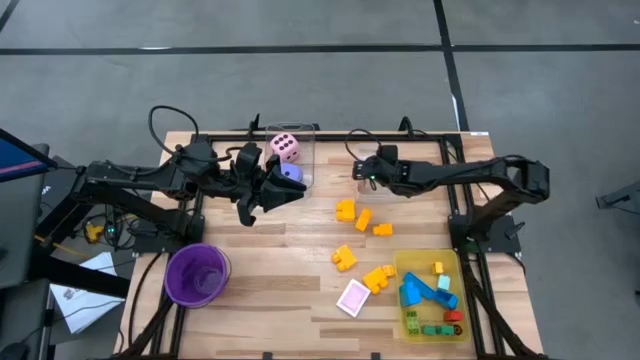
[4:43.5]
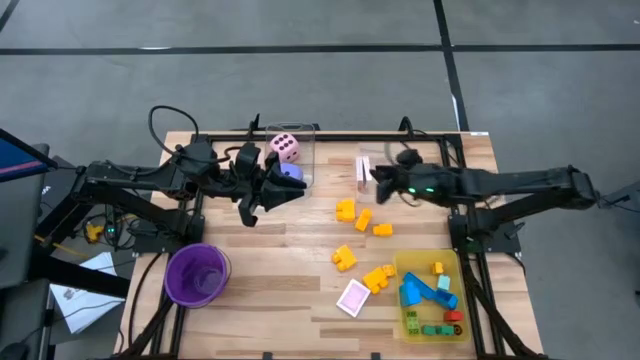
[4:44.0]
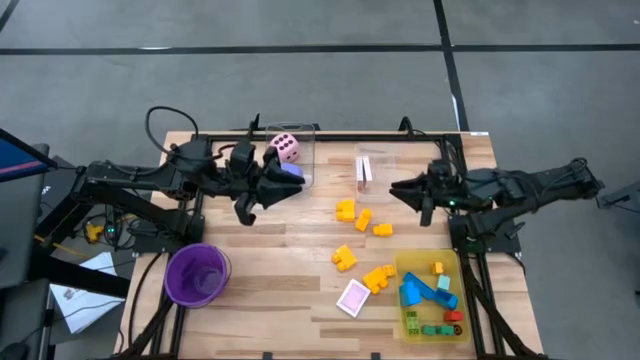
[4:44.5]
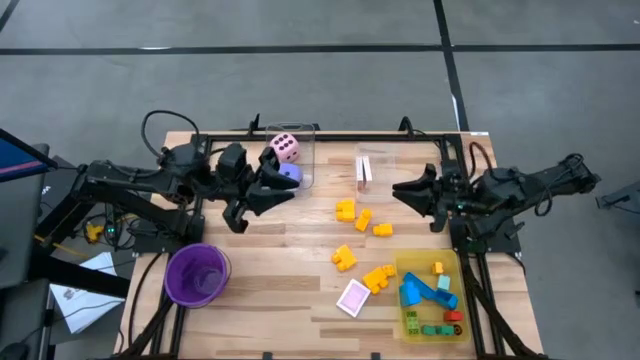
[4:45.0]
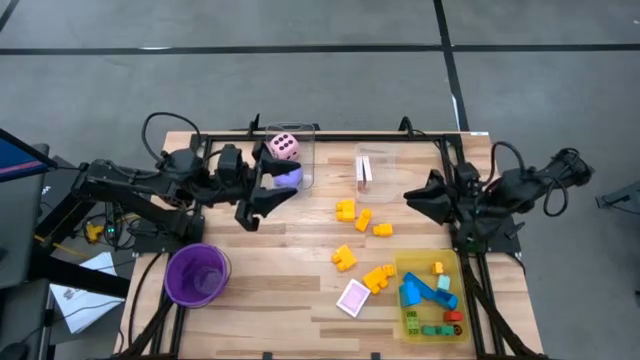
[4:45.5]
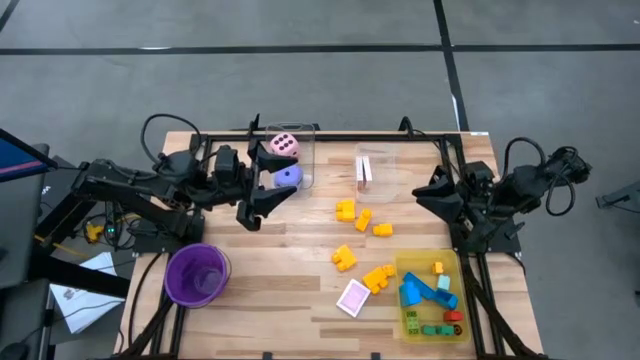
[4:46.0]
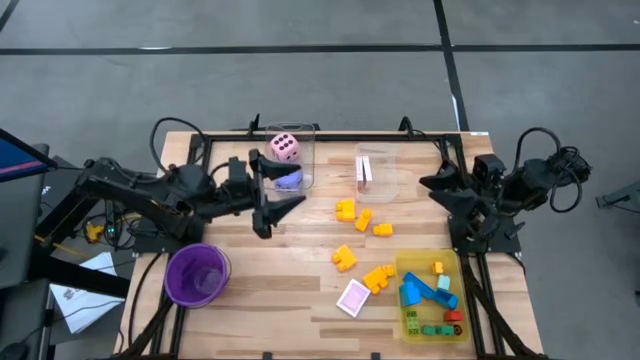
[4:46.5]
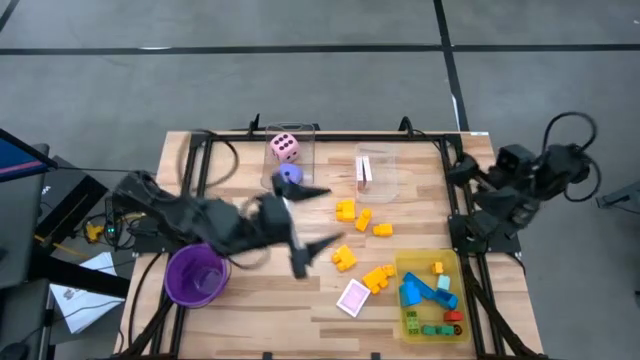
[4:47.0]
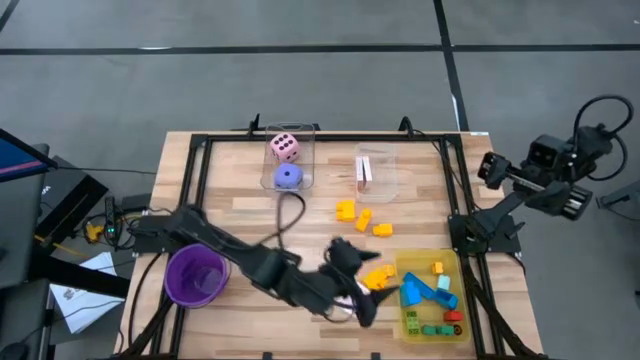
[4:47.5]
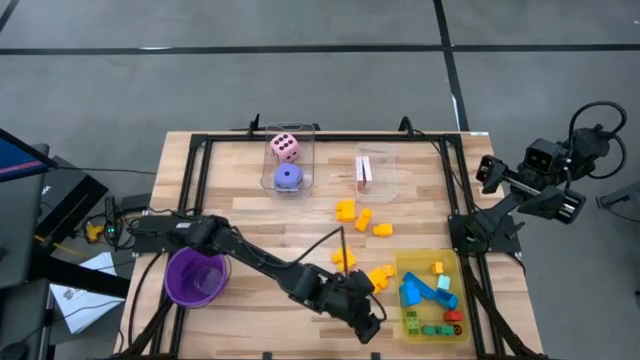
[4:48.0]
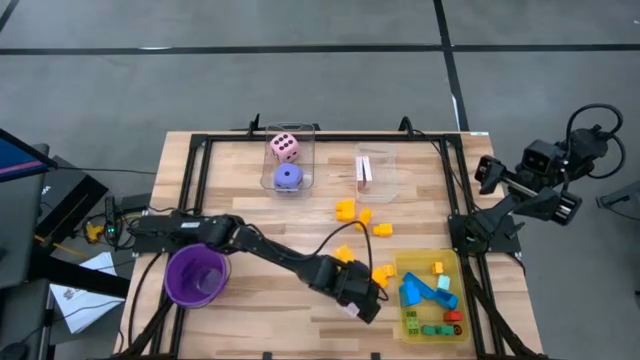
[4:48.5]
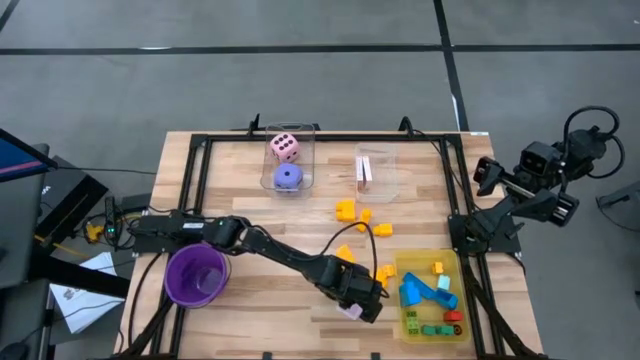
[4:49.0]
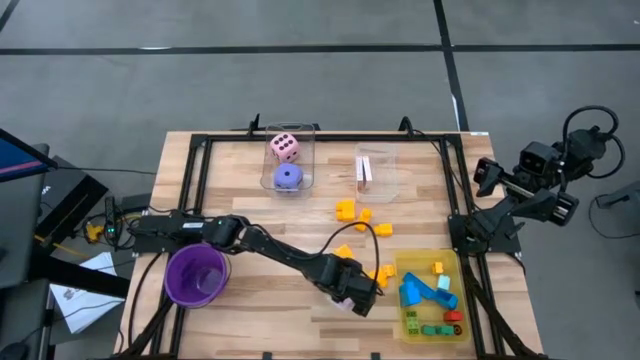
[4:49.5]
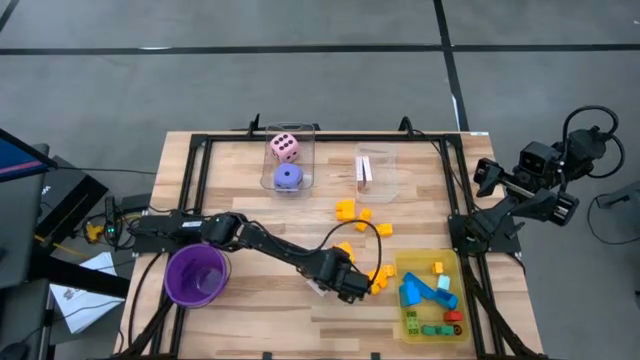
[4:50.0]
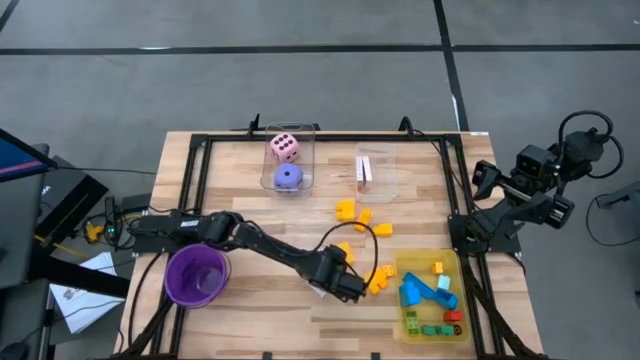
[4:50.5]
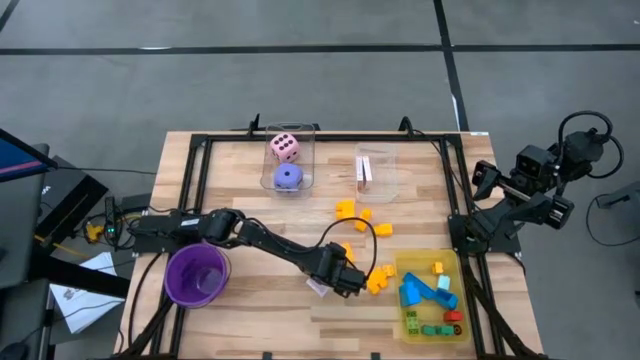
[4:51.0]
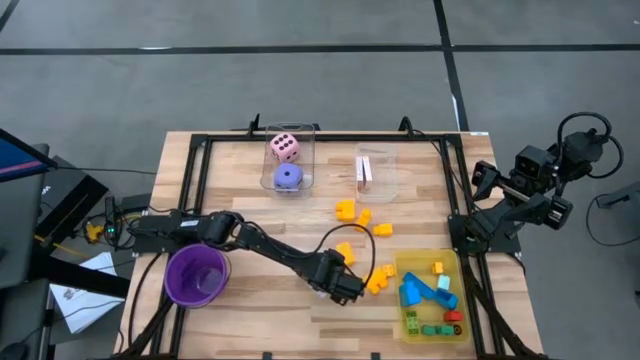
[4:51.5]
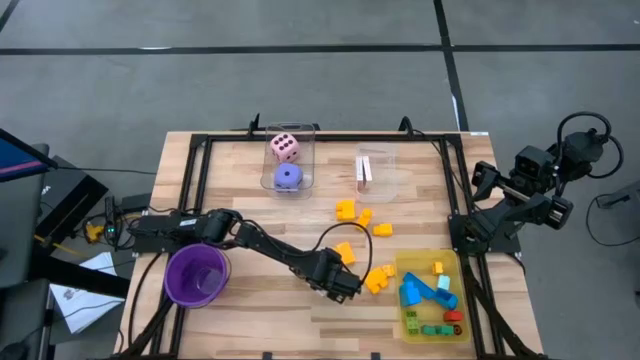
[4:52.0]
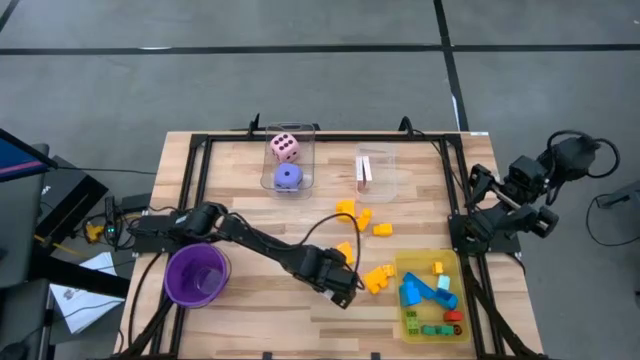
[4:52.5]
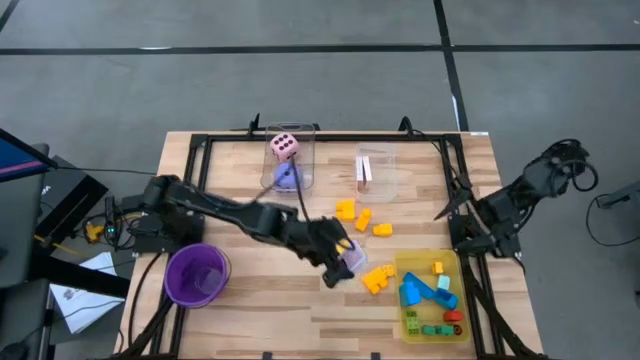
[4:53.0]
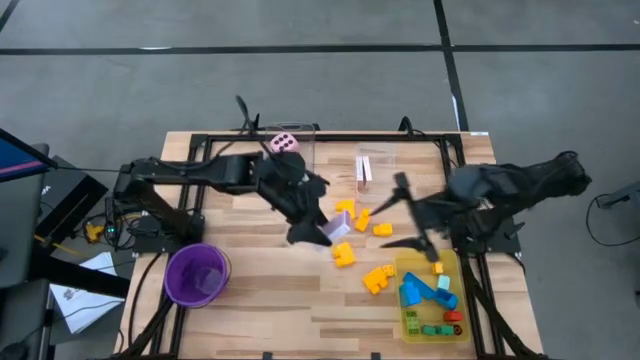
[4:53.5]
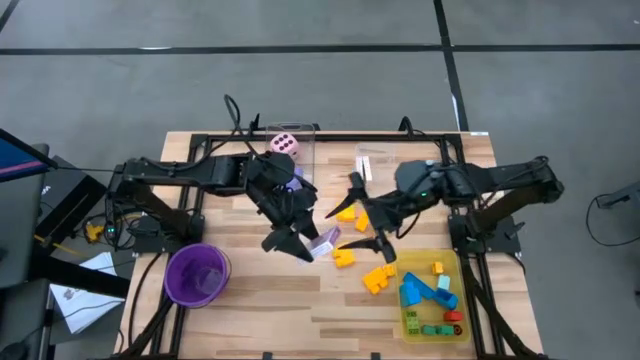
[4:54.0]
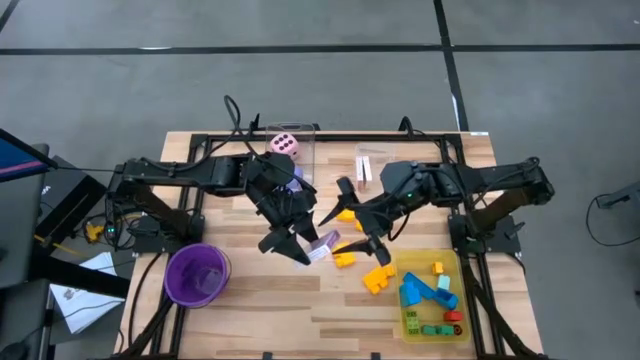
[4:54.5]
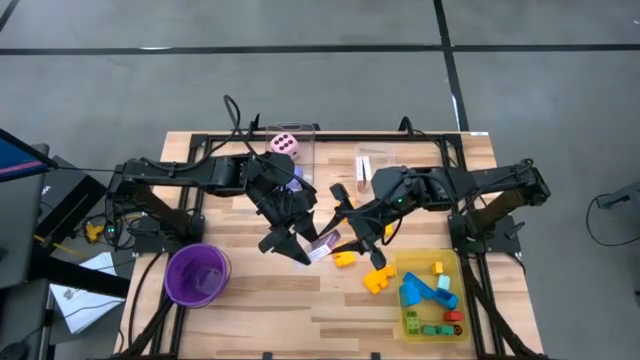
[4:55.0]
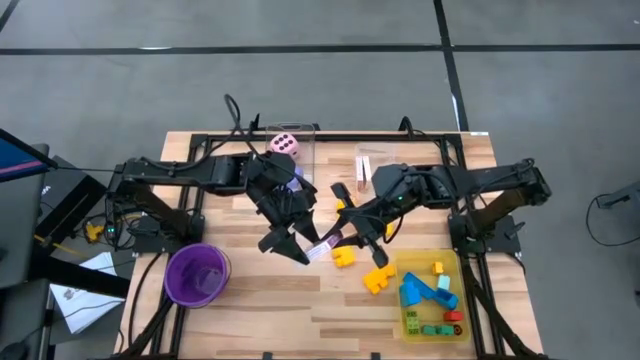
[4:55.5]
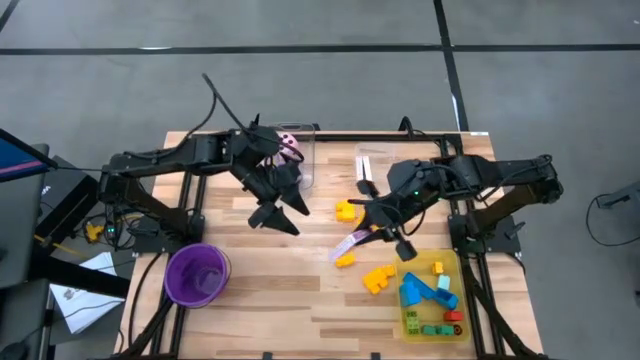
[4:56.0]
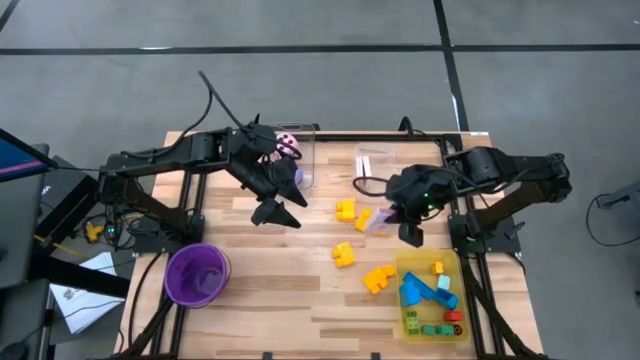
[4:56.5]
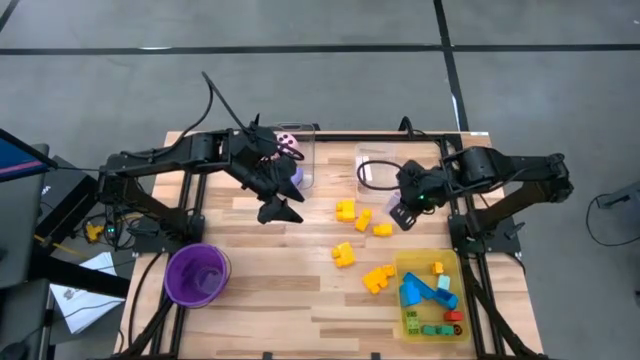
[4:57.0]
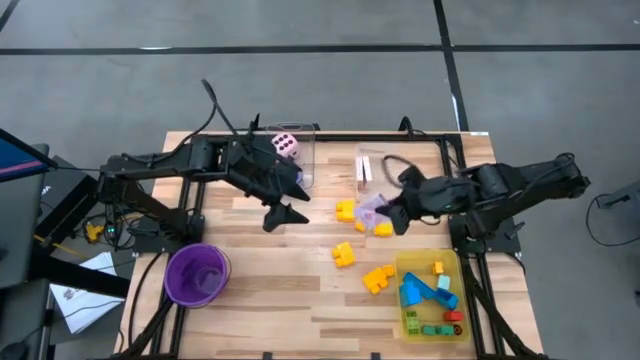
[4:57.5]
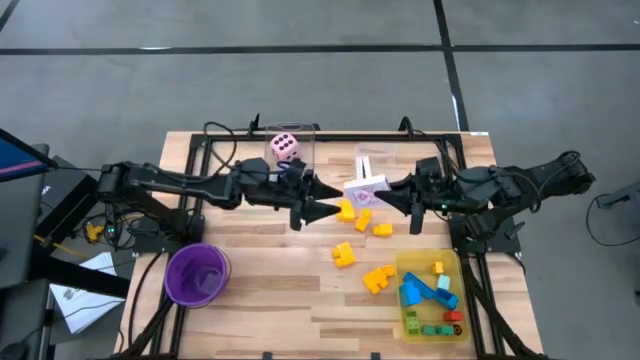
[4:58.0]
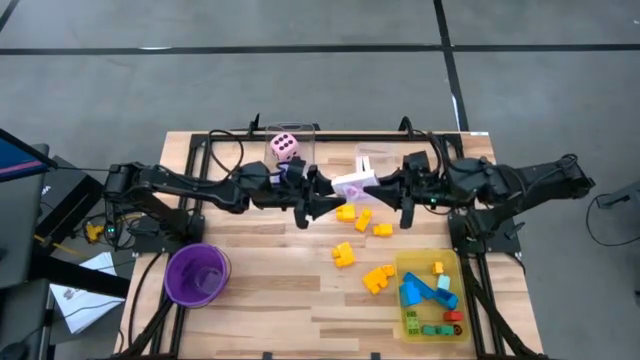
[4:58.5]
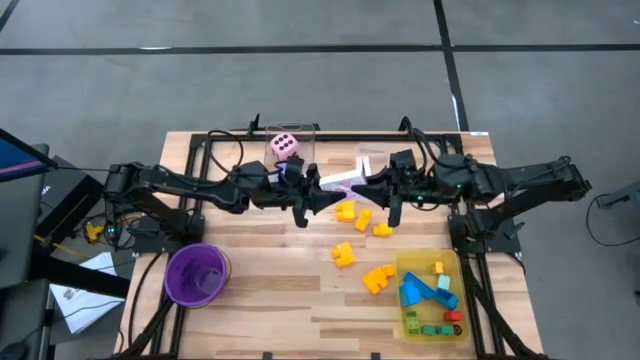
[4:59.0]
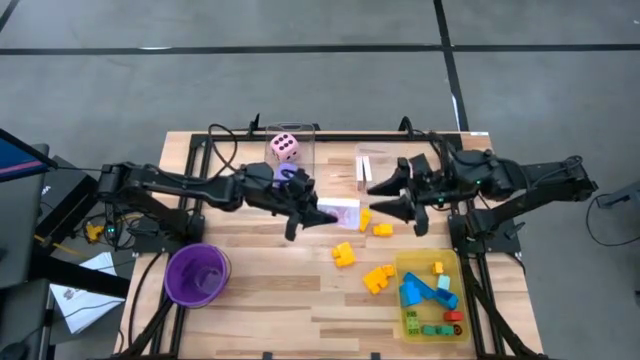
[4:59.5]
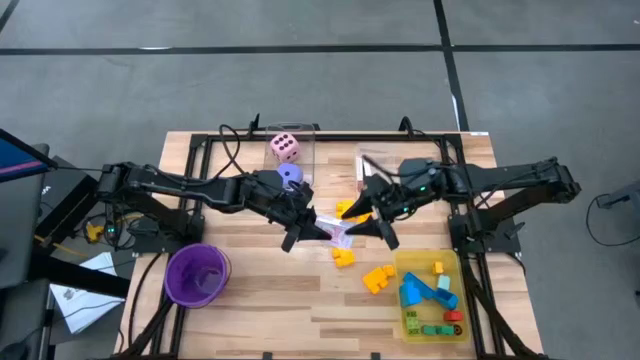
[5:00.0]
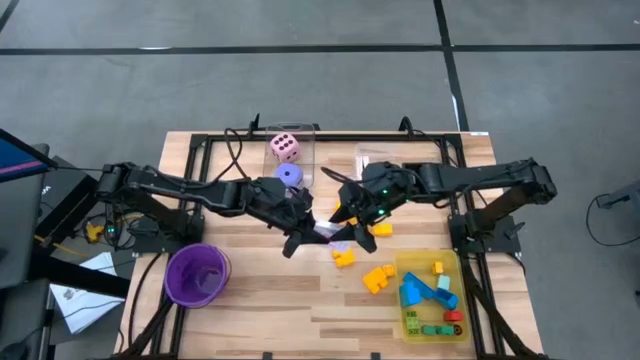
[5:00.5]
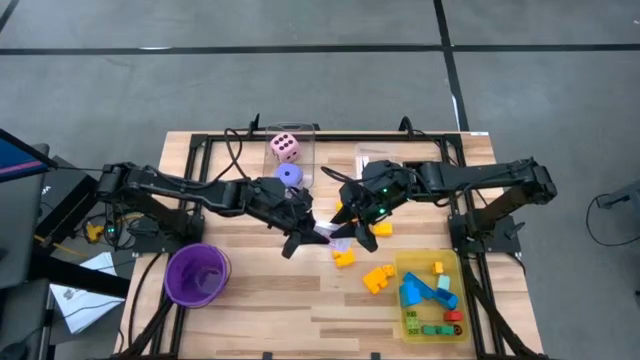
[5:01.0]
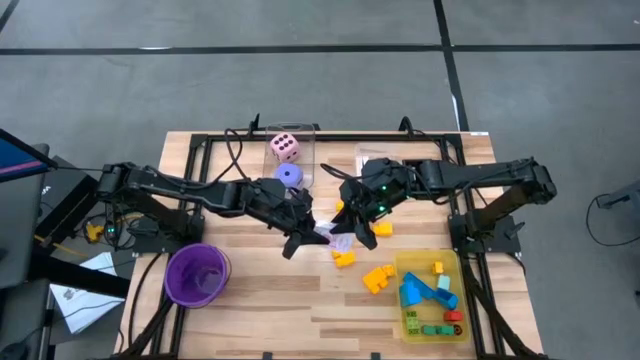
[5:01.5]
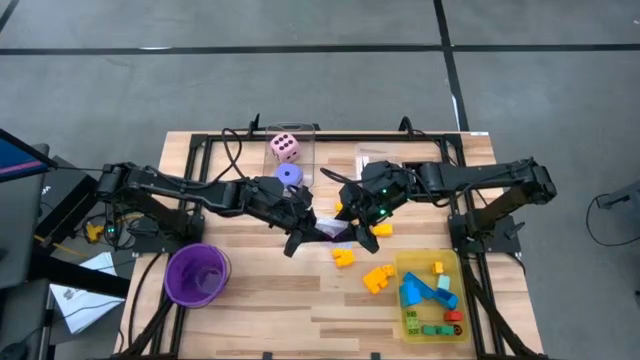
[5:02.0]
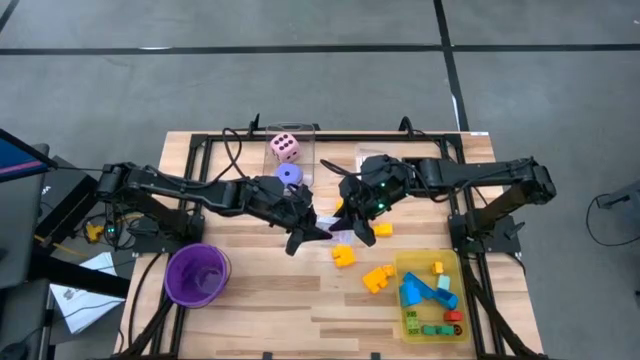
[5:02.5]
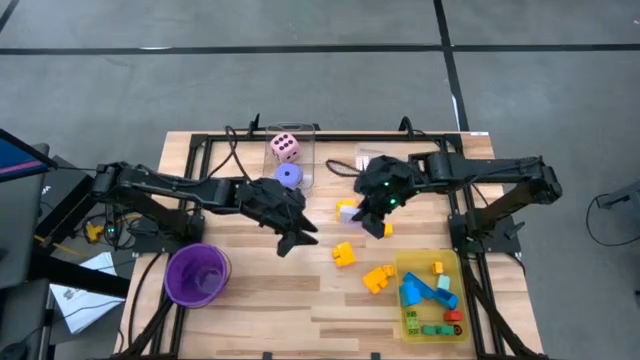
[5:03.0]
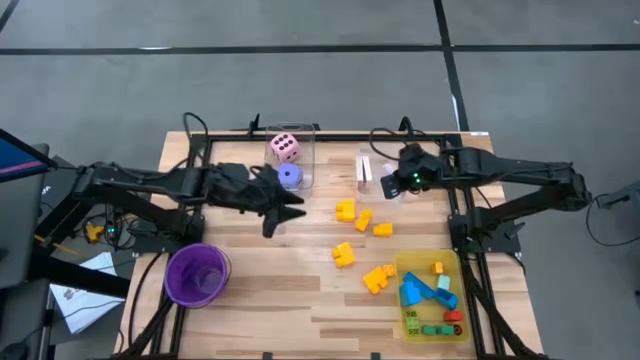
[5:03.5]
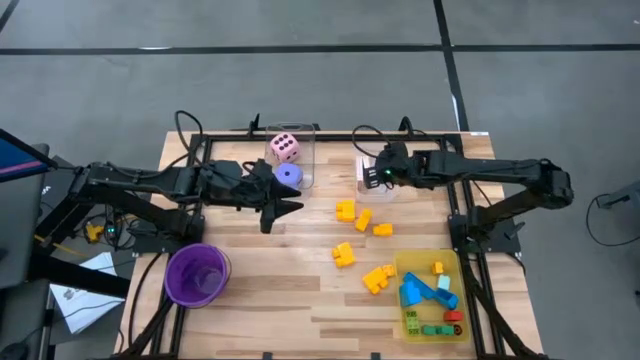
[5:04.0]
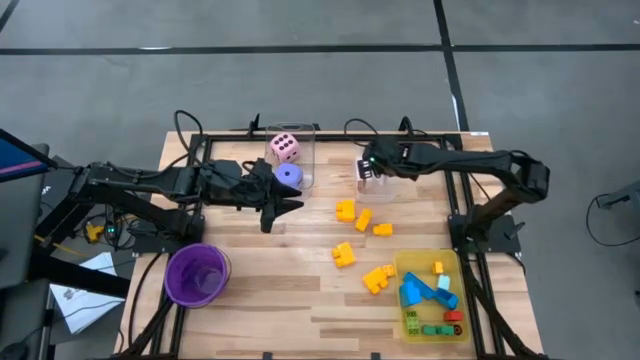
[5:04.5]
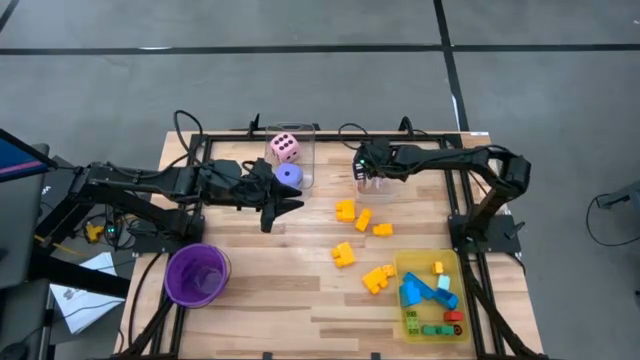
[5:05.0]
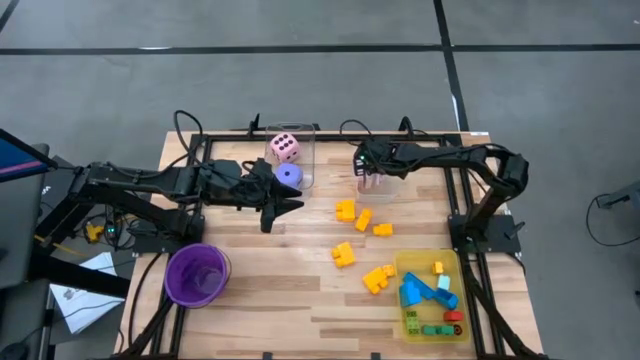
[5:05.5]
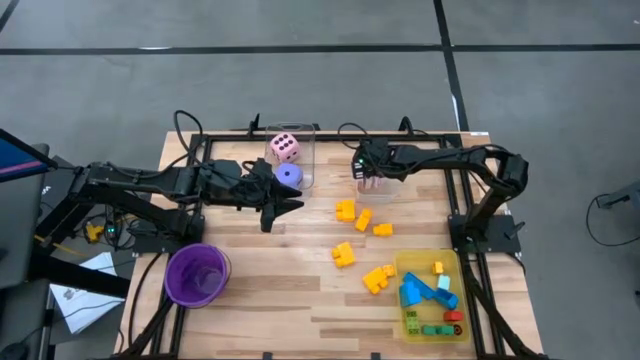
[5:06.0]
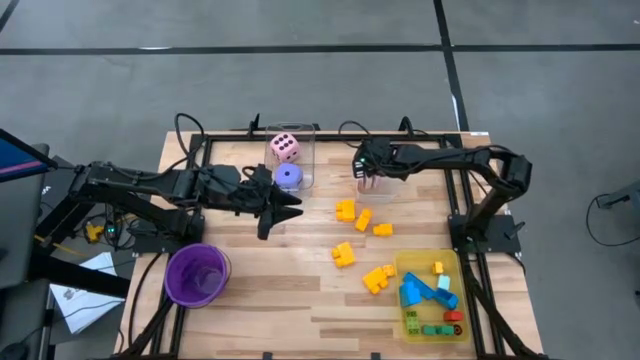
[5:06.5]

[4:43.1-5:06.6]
Task: Pick & Place Toys
Put the pink deck of cards into the right transparent bin
